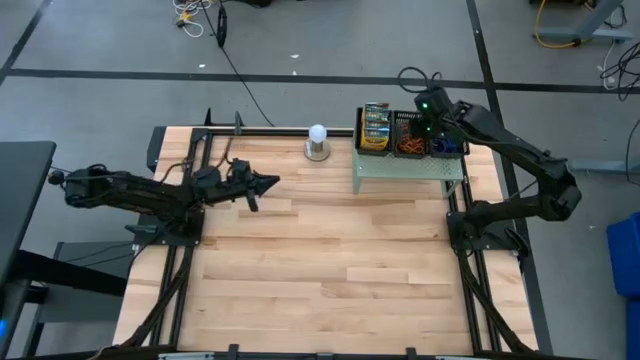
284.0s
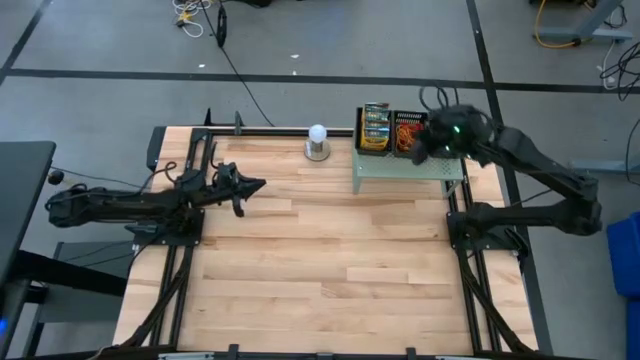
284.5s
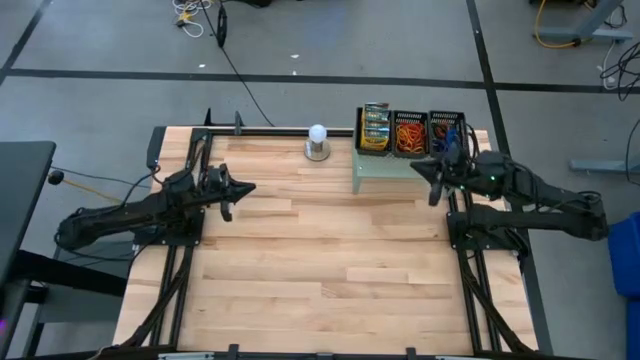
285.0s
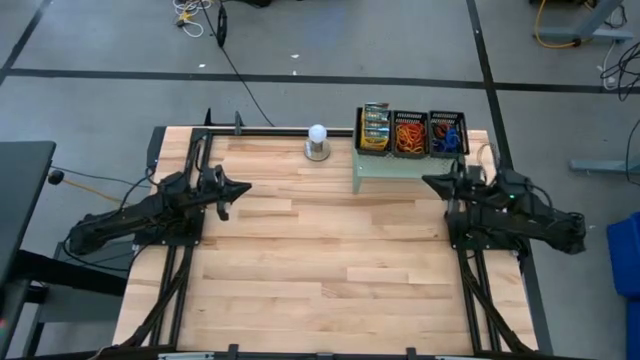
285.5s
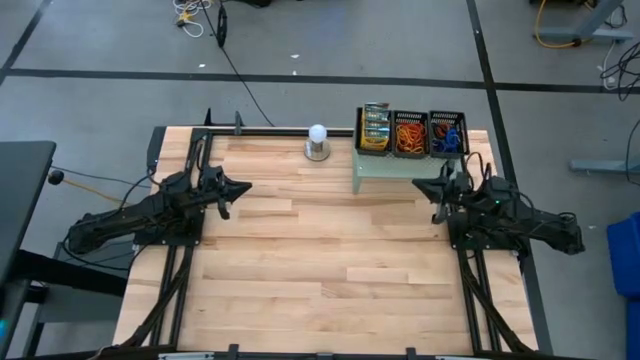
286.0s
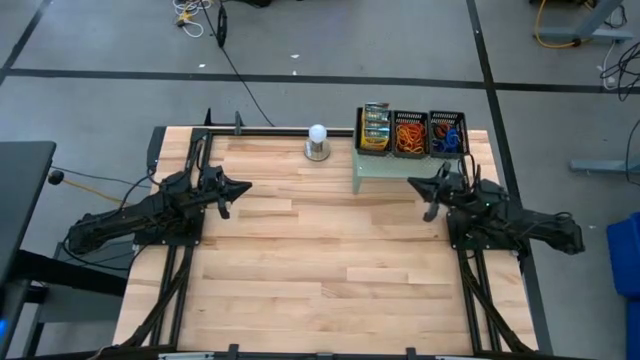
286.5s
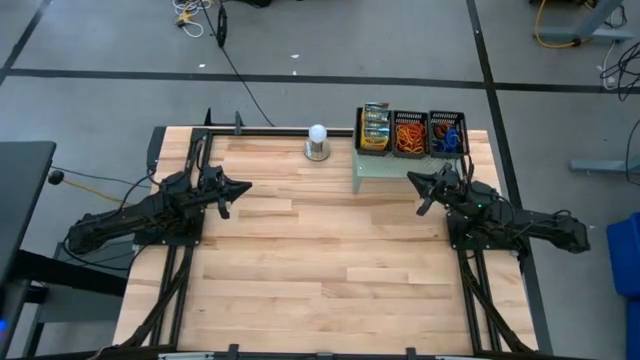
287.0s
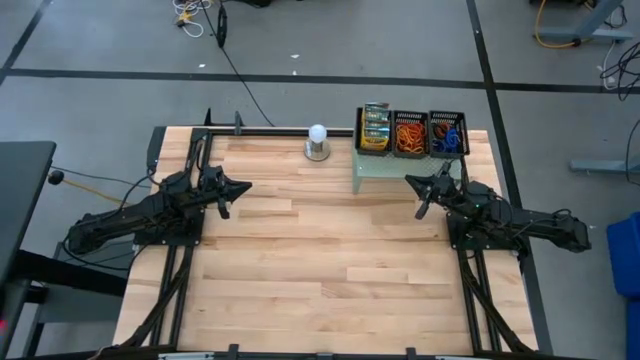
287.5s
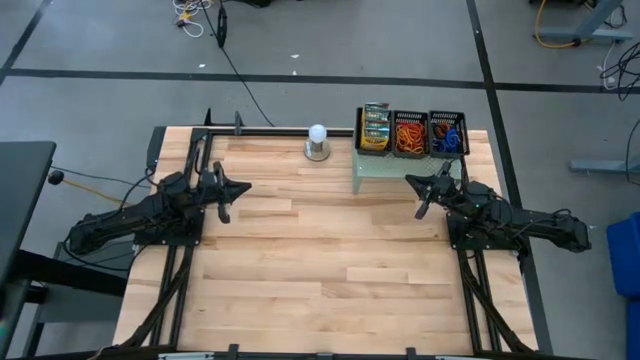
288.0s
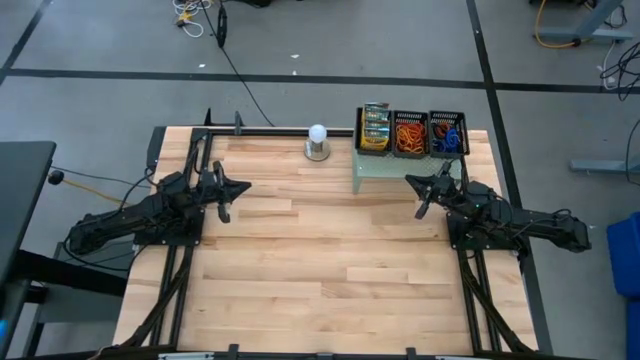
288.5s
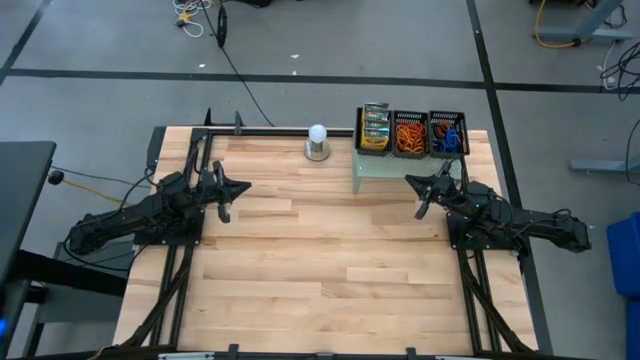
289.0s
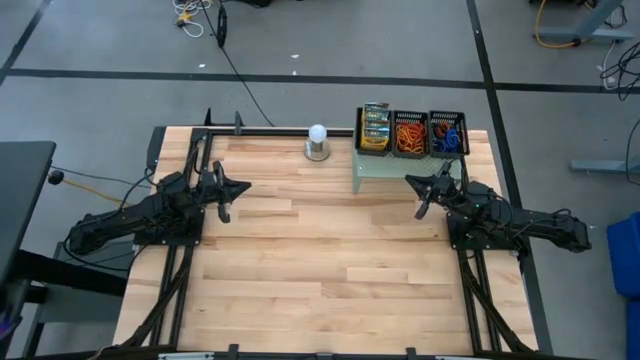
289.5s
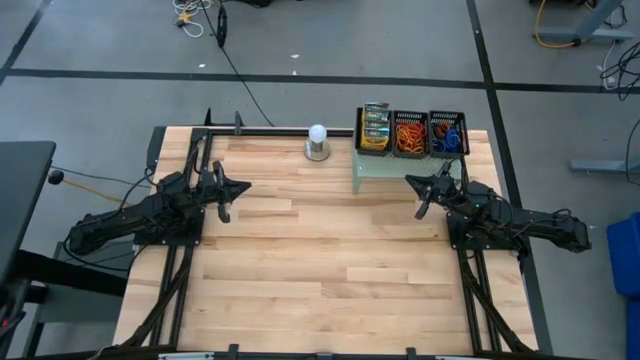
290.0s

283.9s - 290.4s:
Task: Pick & Place Office Desk Supplies
Return to Home Position

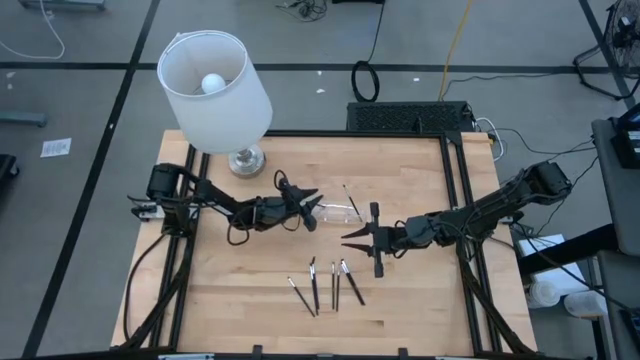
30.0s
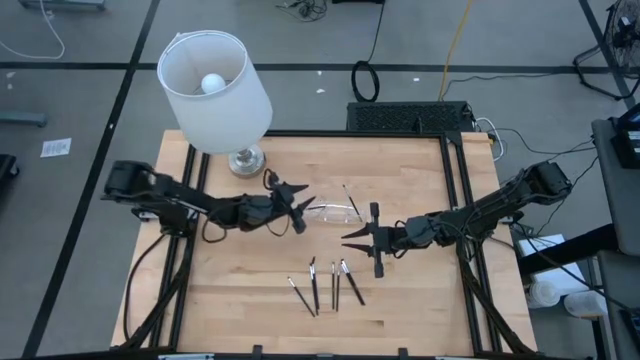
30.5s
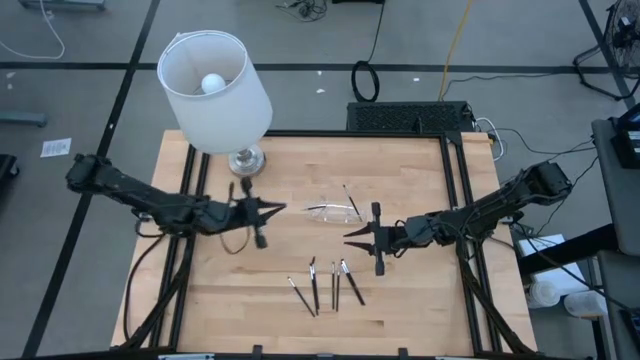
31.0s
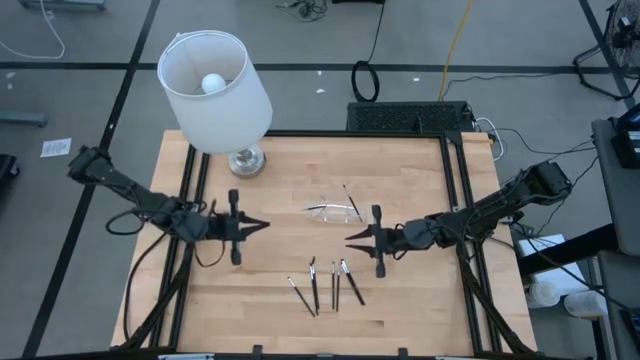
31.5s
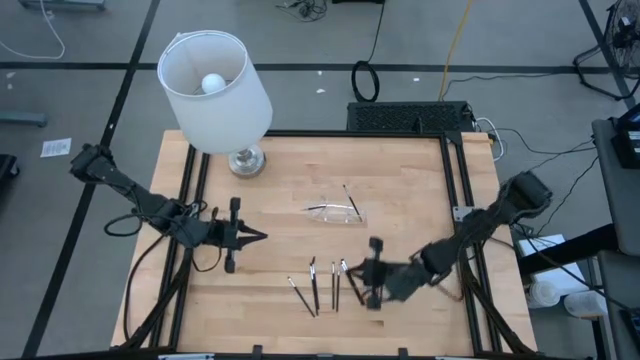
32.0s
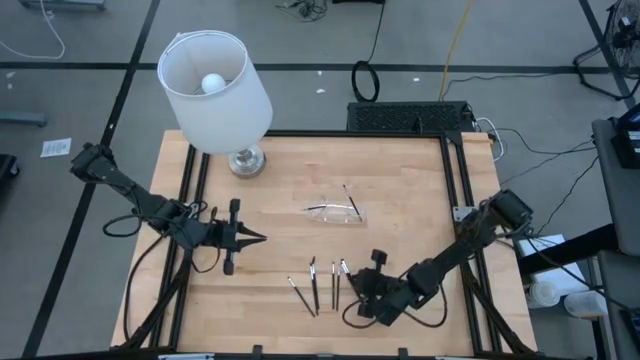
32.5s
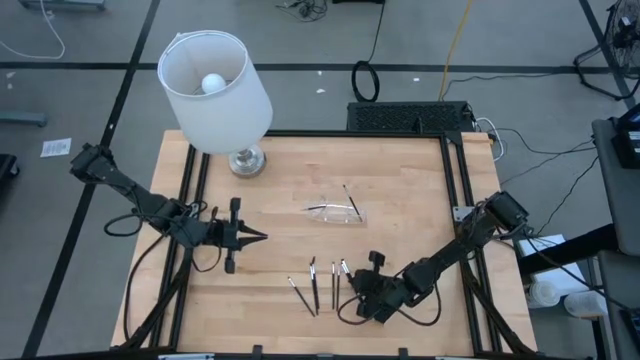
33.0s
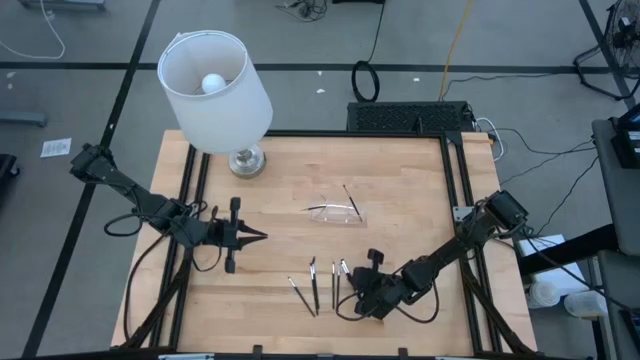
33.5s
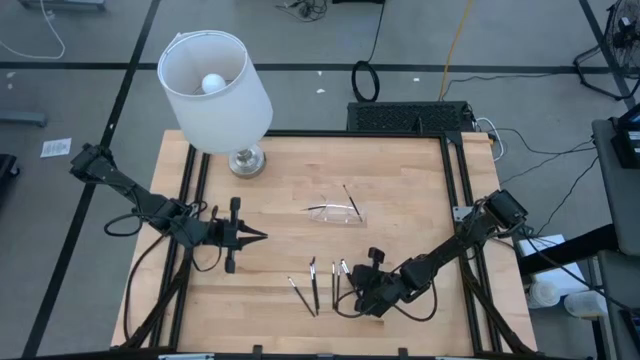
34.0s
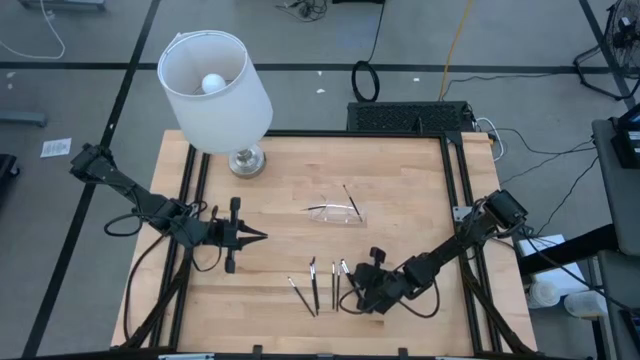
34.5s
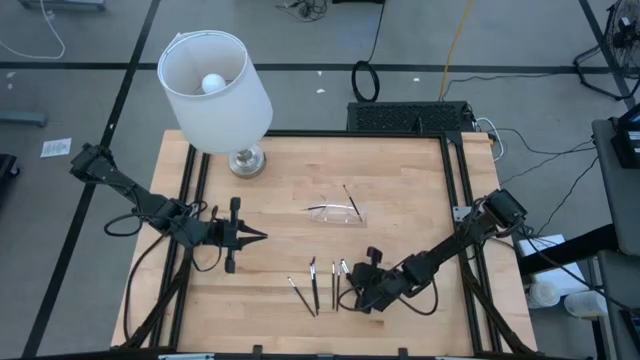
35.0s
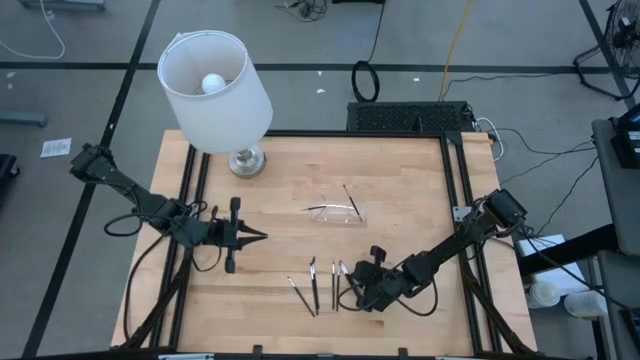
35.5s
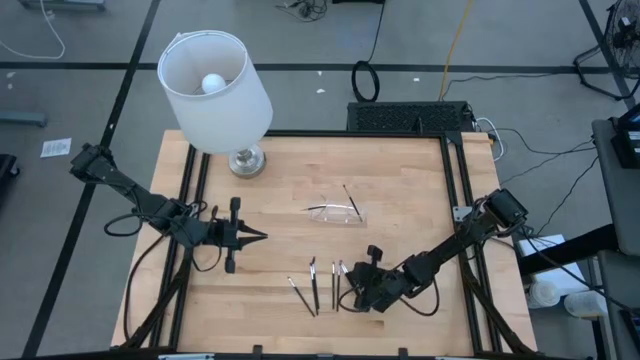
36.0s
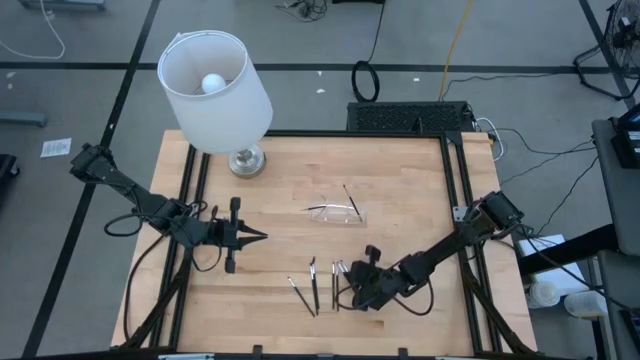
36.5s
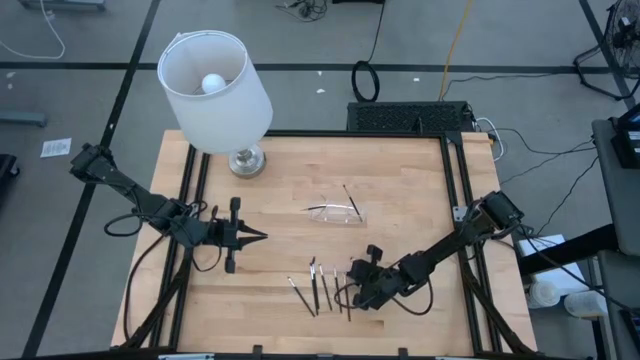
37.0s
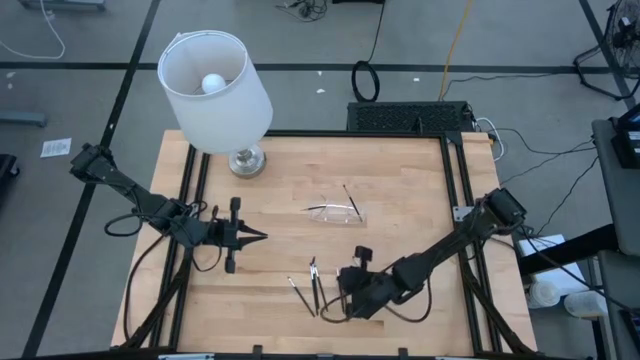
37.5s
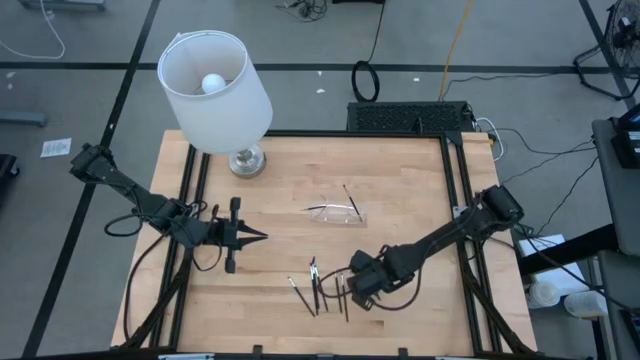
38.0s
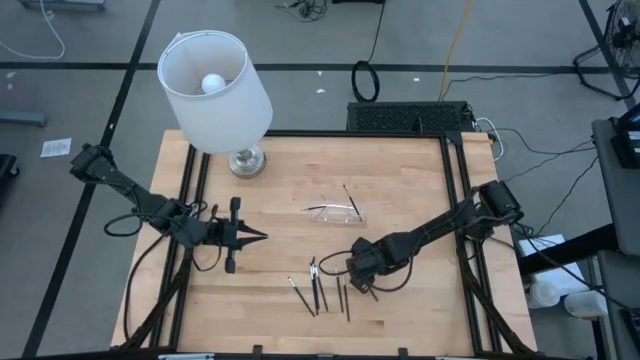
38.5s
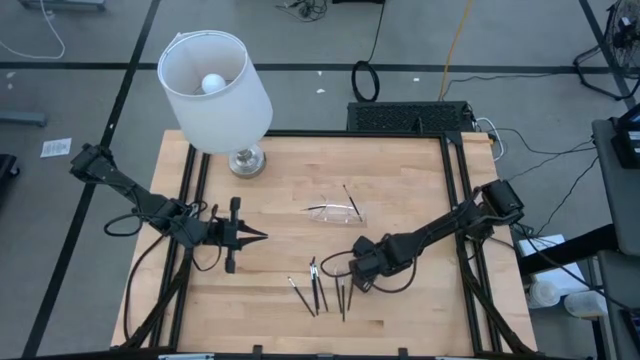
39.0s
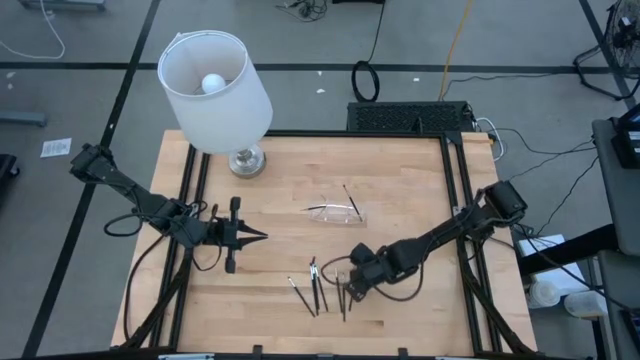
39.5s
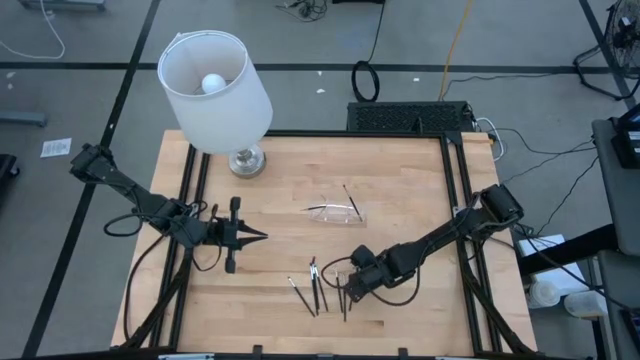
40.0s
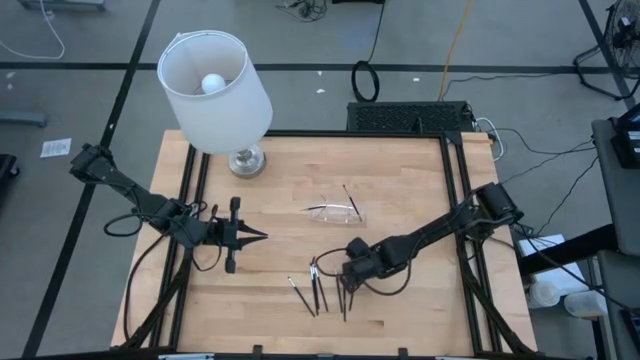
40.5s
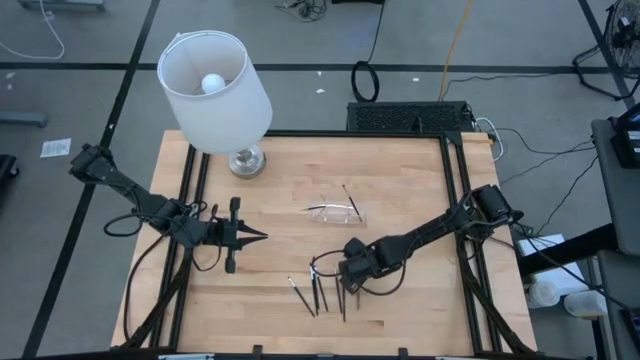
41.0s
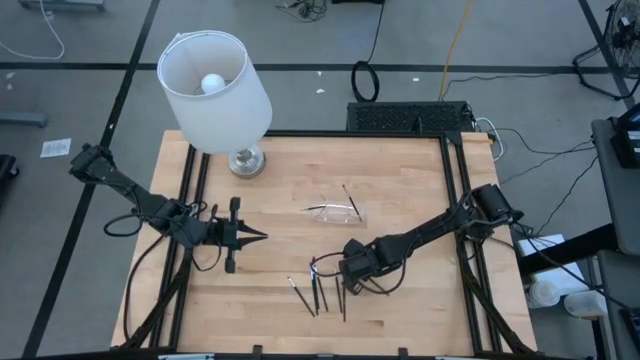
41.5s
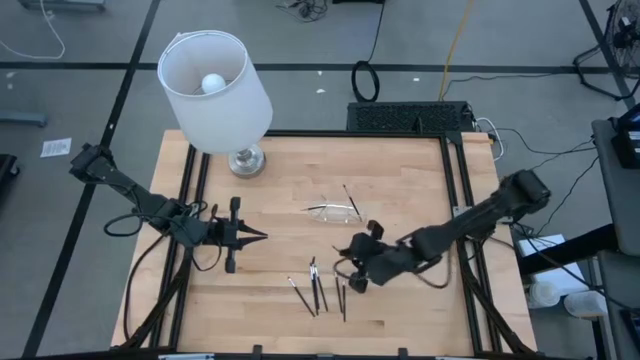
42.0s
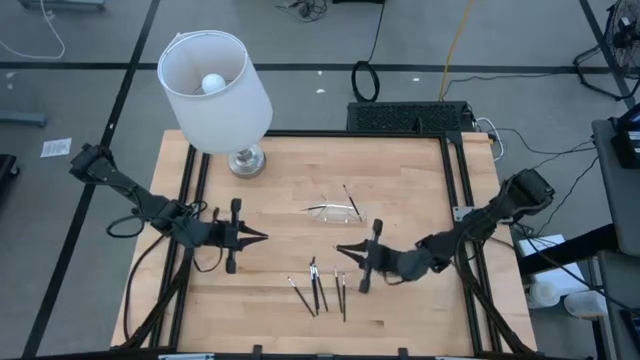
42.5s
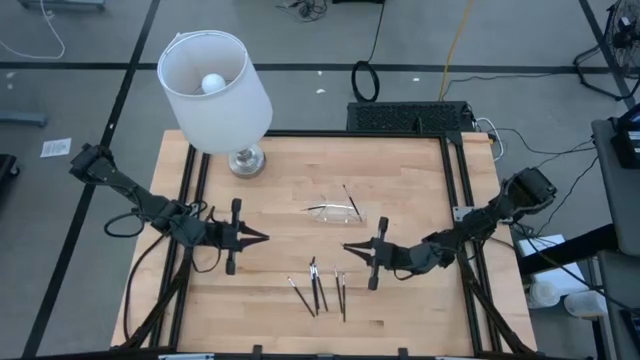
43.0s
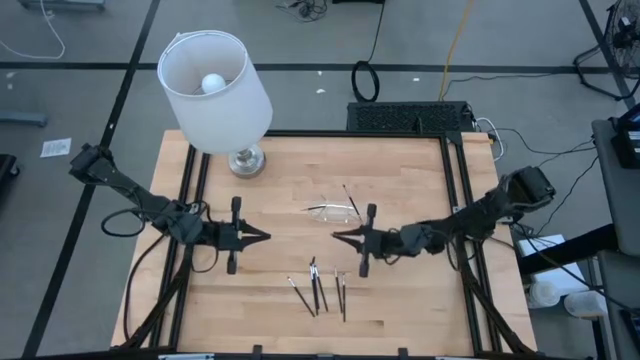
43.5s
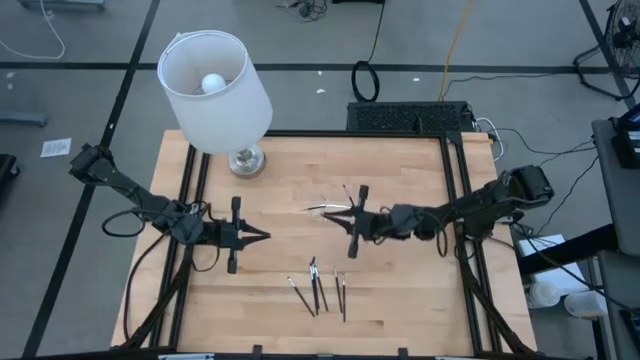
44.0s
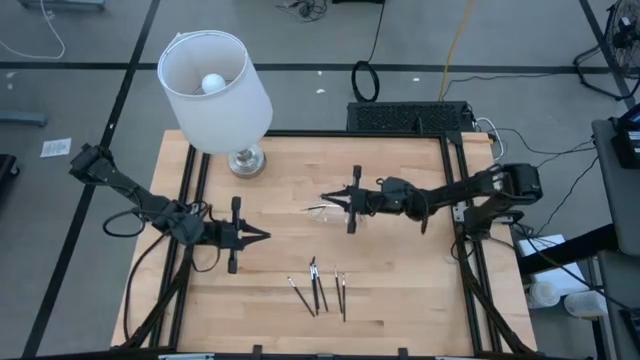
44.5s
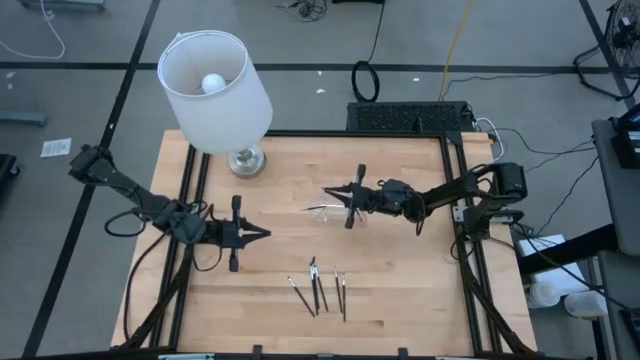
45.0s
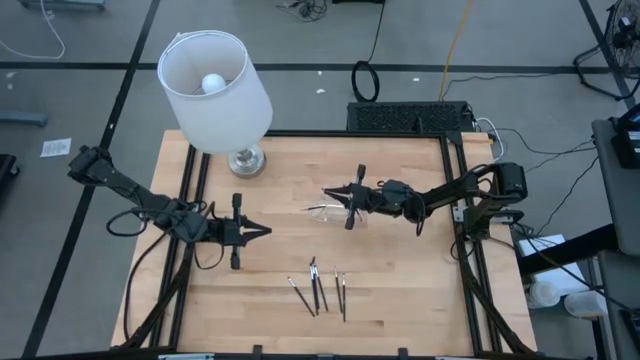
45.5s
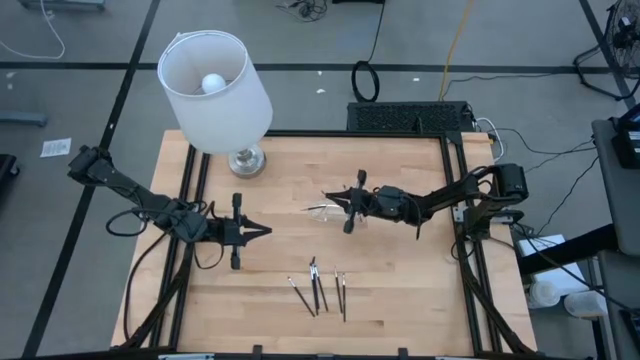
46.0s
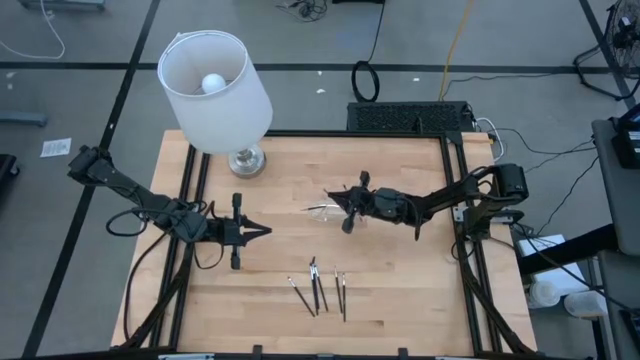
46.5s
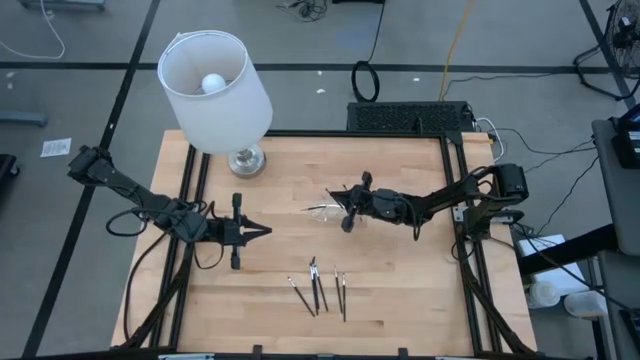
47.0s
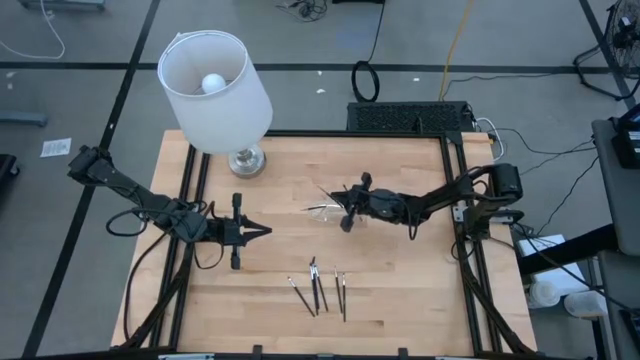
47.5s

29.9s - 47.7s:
Task: Put items in baskets/containers
Put the eyeshadow brush into the transparent organizer
